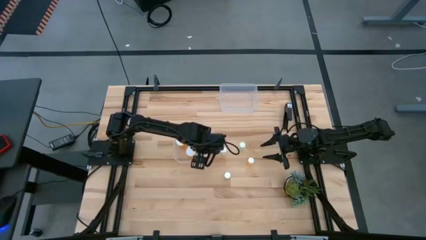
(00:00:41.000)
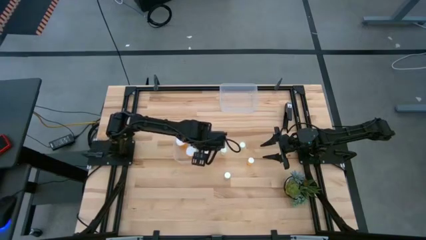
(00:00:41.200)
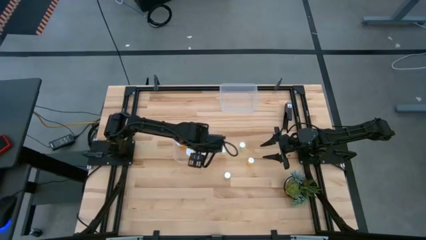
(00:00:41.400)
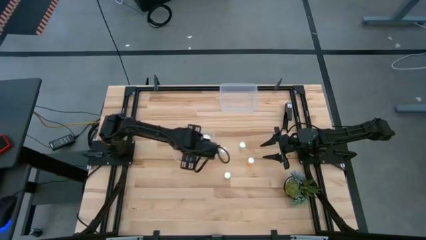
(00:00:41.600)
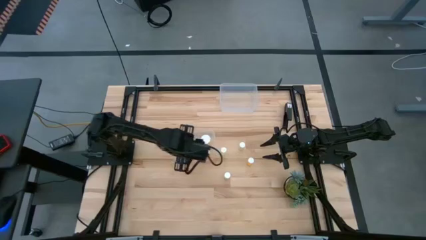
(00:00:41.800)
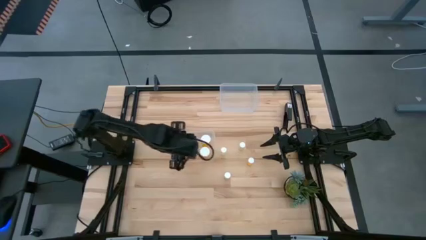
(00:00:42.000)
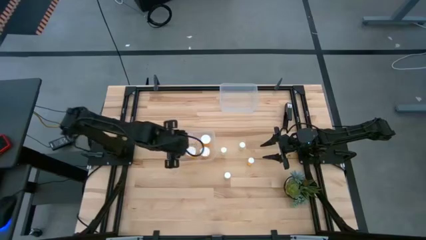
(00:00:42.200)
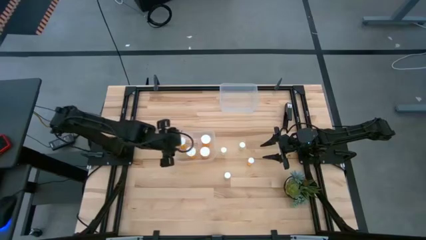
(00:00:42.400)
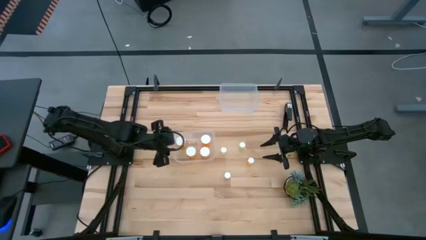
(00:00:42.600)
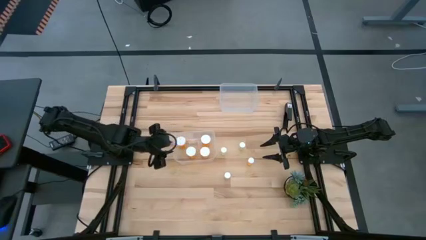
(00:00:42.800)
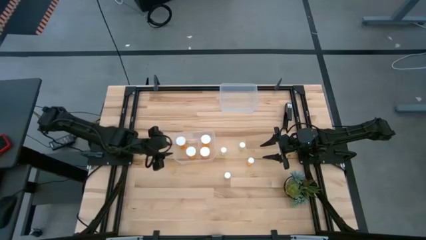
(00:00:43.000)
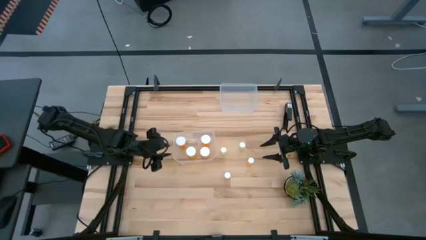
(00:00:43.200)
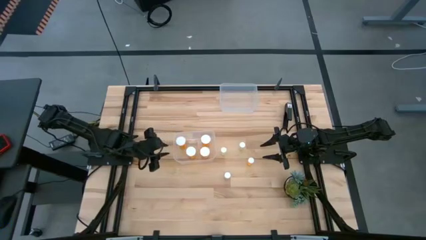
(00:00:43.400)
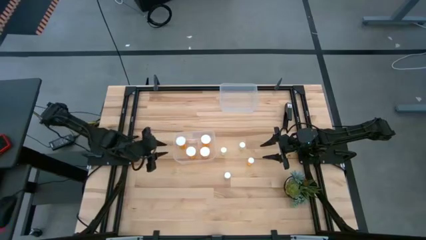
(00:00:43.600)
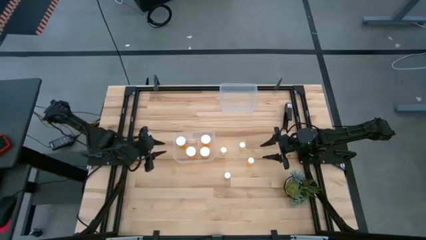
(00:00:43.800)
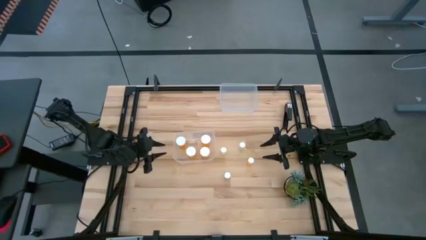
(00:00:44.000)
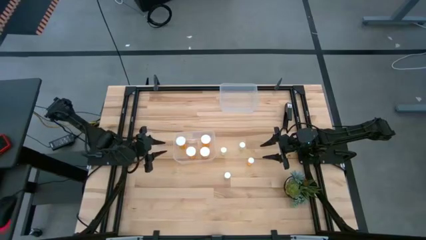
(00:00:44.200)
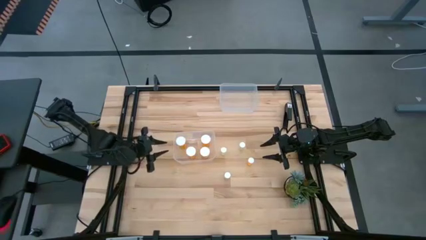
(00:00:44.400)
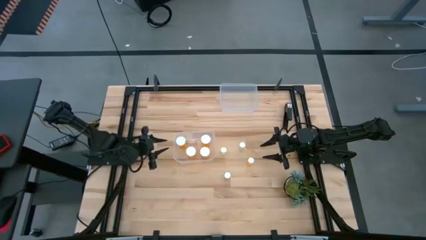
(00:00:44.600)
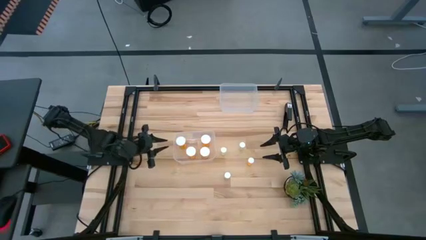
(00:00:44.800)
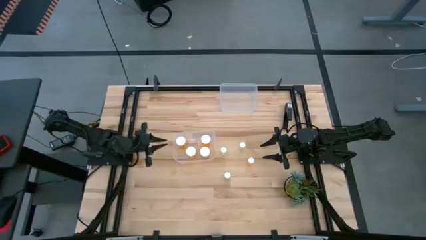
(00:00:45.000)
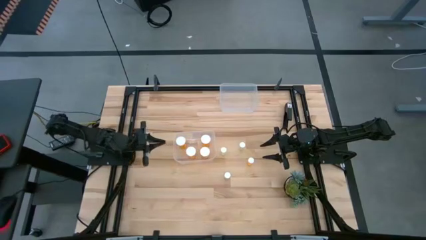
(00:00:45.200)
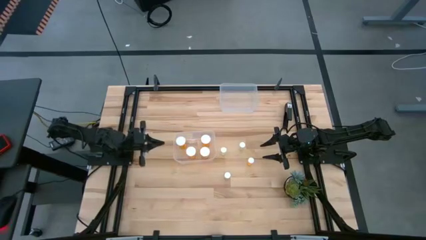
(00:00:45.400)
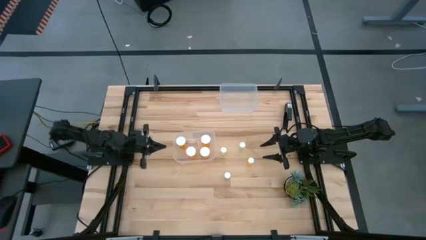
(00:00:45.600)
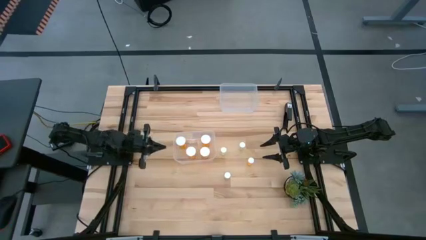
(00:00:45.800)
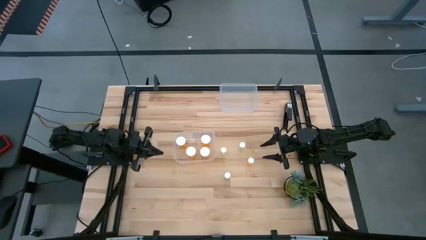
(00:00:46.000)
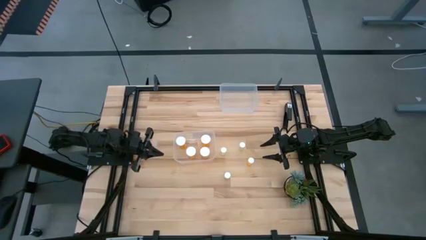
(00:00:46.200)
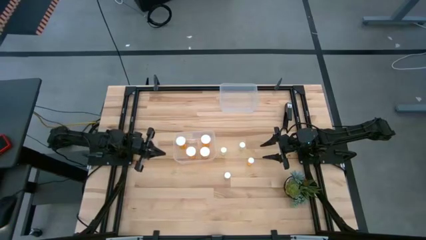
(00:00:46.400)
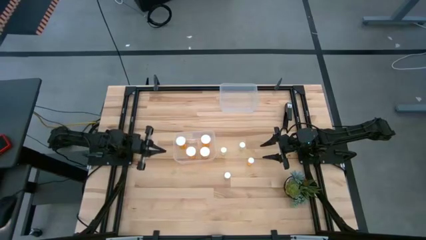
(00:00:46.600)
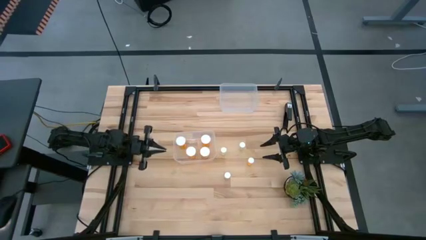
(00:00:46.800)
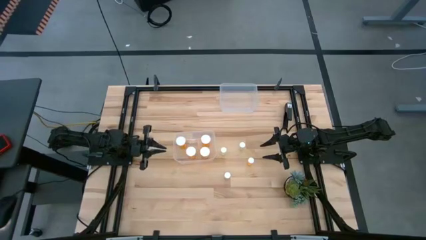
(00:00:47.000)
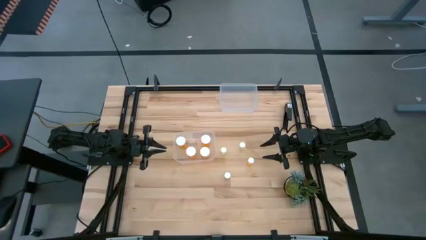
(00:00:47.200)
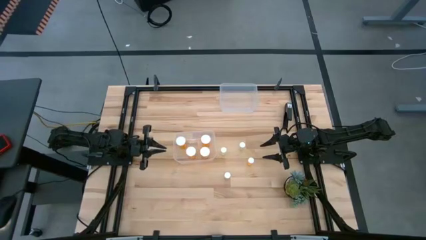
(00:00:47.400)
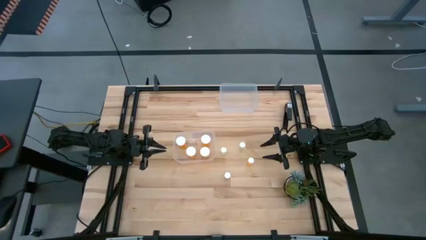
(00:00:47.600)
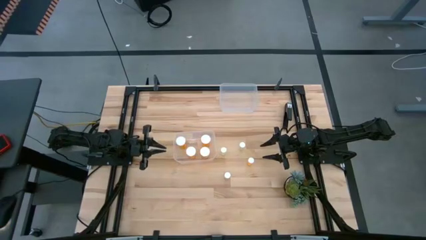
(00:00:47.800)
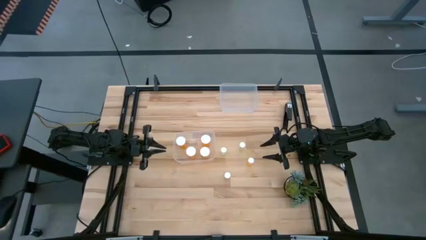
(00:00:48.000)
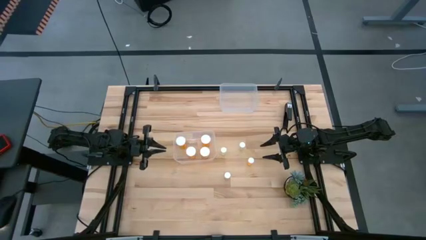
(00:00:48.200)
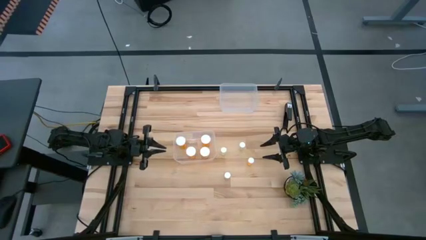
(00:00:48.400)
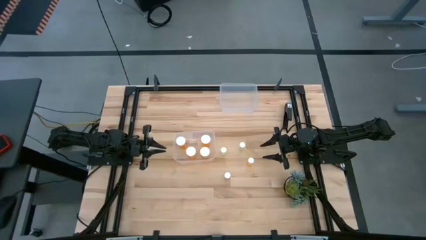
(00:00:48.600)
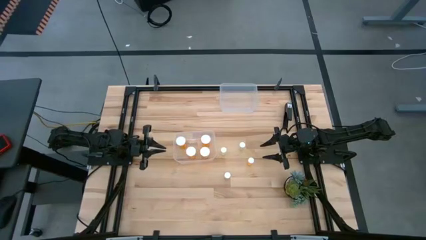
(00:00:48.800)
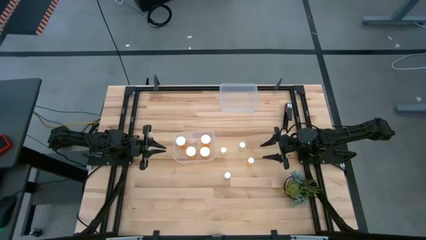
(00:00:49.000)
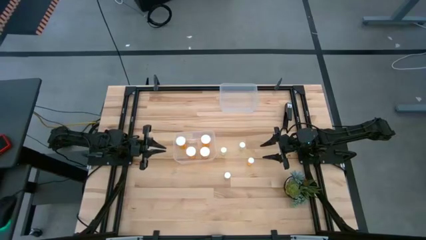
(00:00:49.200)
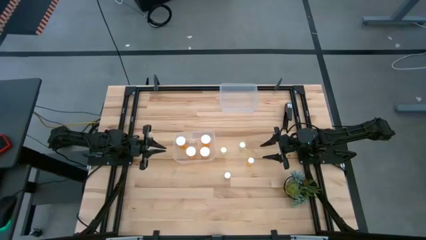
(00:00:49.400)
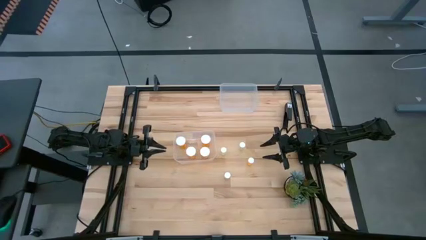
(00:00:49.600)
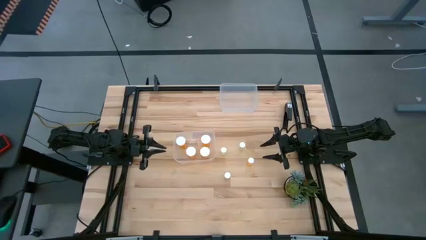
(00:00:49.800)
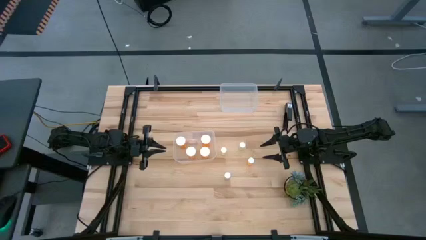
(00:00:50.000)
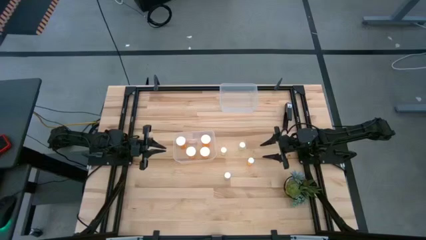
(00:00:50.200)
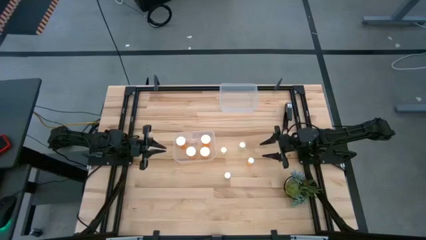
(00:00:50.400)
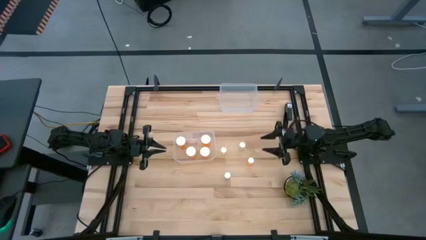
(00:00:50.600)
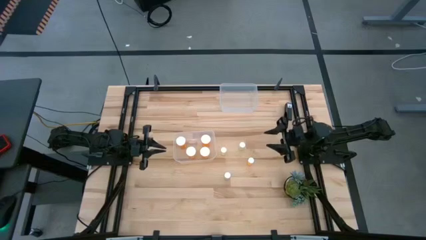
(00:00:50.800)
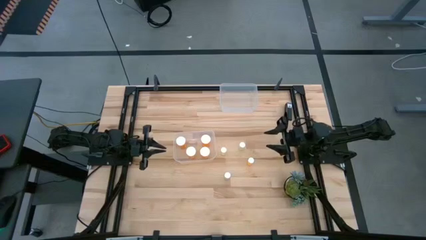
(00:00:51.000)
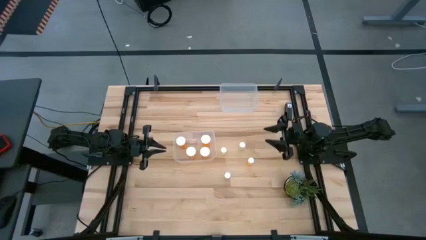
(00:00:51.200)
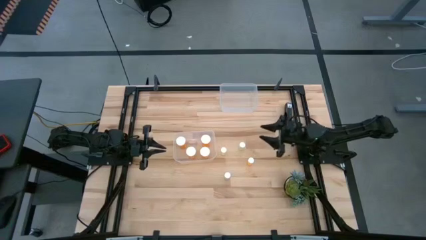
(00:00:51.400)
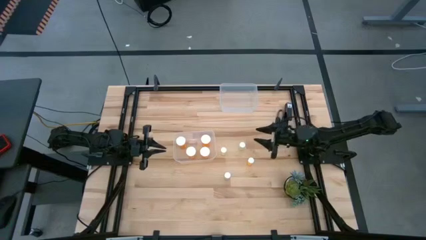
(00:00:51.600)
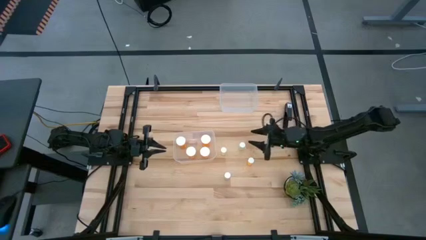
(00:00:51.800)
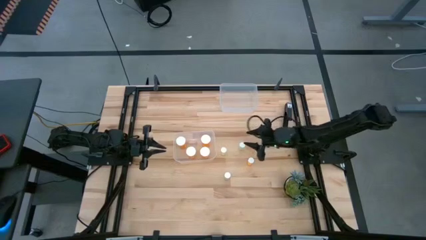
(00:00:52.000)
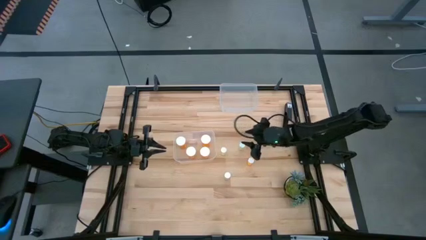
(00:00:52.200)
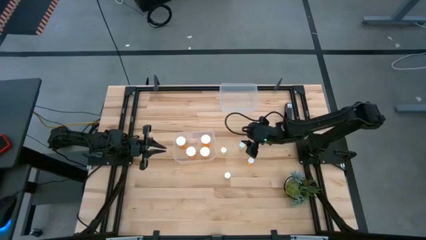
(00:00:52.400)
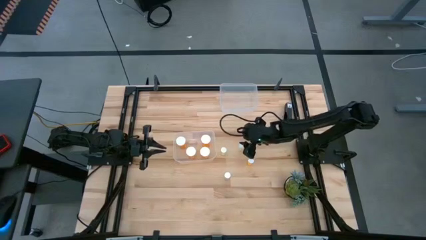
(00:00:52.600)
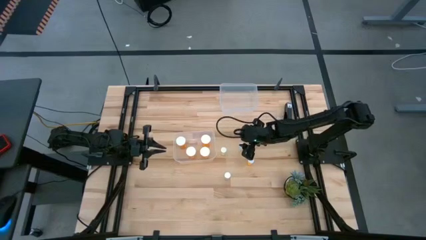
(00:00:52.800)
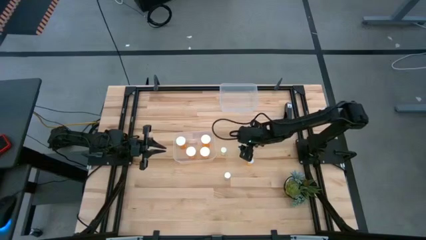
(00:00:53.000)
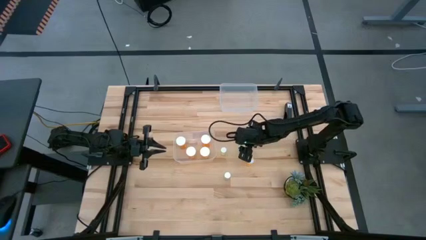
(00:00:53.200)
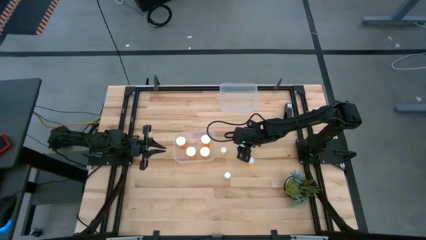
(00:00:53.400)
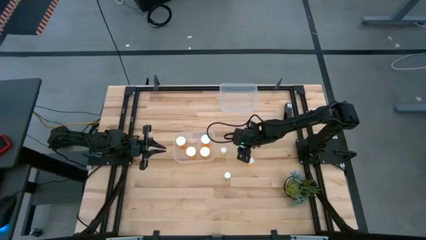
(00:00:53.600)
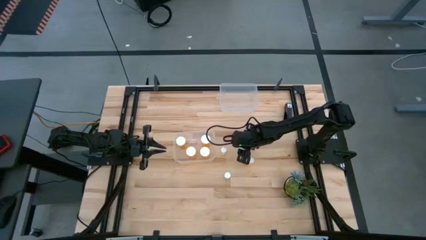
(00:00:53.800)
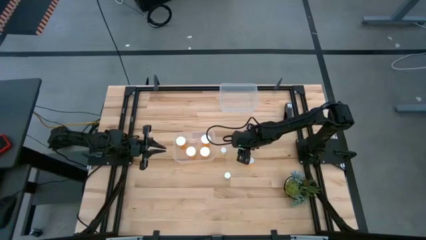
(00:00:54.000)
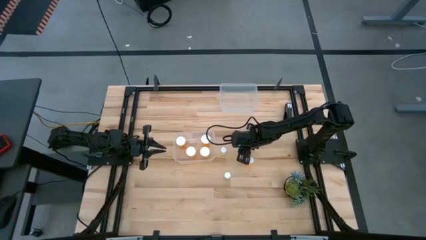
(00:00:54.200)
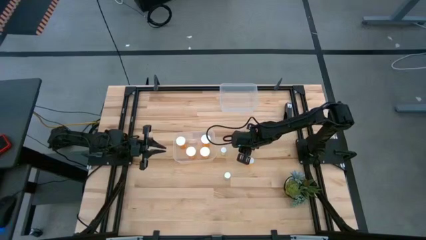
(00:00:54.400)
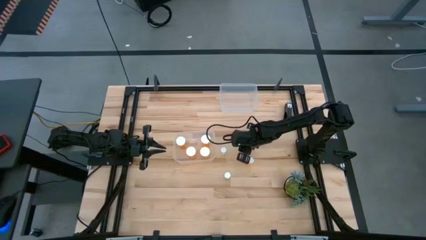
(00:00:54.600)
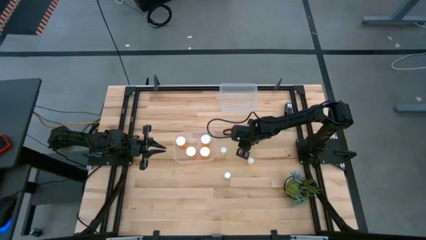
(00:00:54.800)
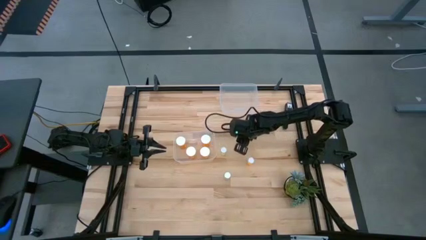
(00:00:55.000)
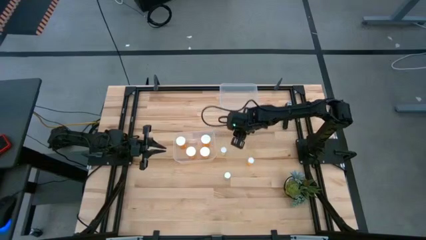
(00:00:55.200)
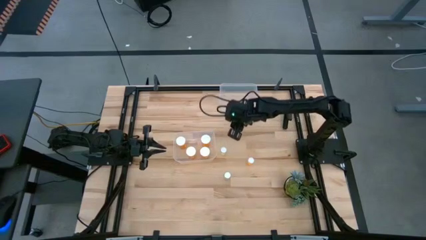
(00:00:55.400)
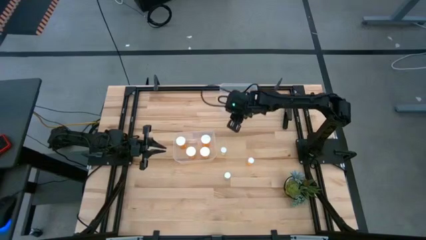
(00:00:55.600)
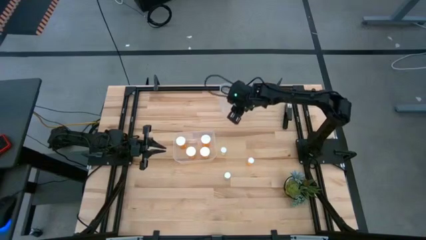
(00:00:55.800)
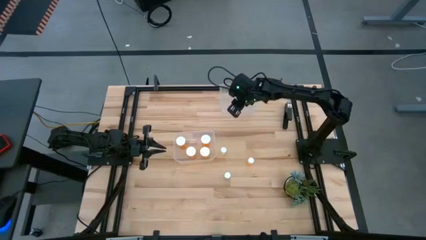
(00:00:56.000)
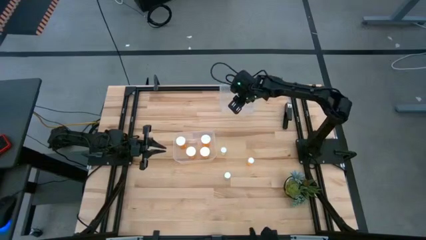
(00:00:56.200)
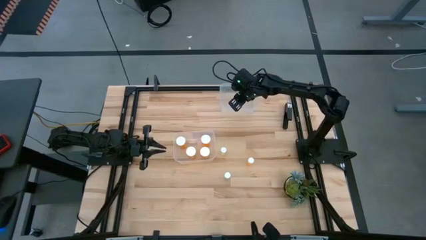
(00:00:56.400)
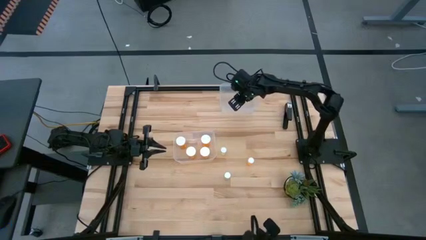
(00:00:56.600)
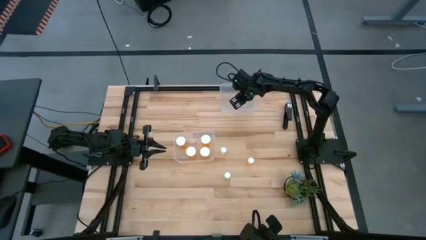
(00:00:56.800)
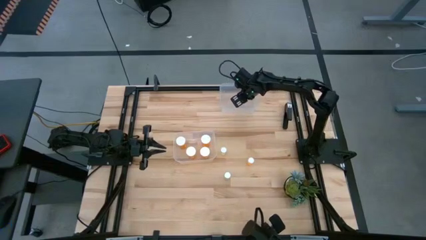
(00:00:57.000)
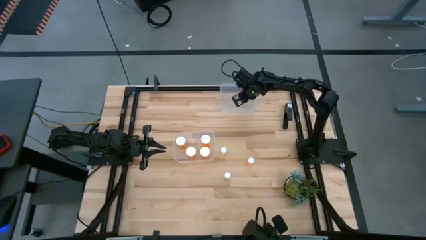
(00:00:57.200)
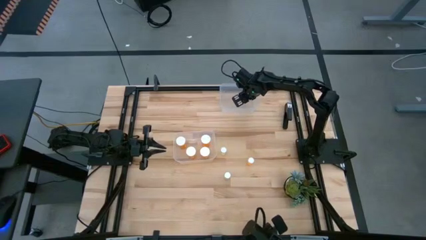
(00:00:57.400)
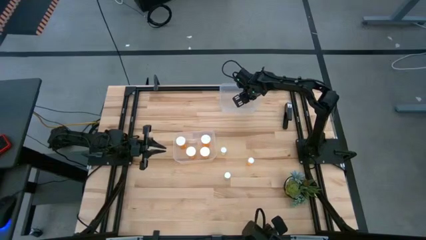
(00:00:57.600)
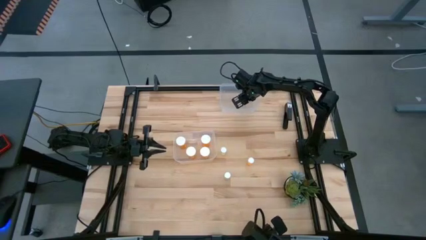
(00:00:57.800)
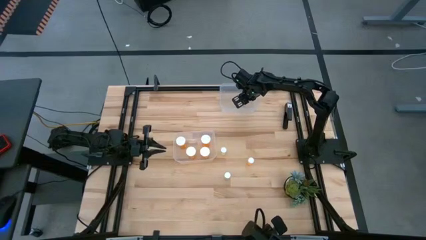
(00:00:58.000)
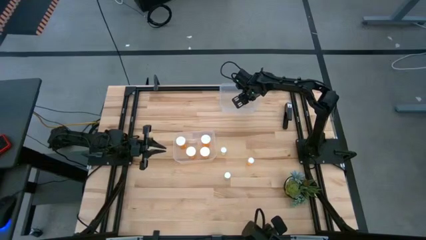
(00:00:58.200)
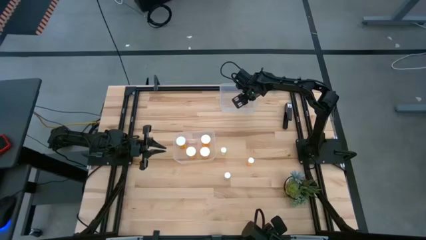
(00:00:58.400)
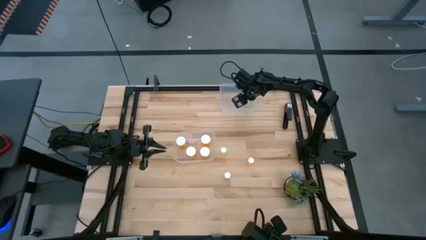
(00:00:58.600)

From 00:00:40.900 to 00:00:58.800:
Task: Pick and place medicine bottles into bin by pill shape (circle, oval)
Put the top small yellow pill bottle into the top transparent bin
